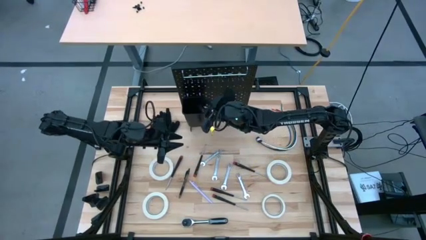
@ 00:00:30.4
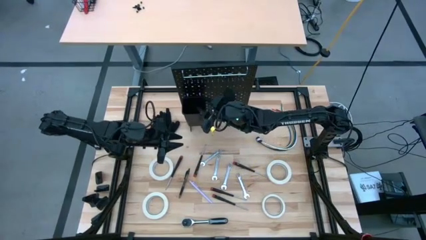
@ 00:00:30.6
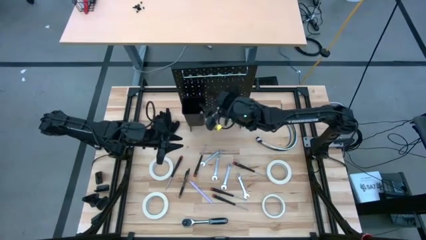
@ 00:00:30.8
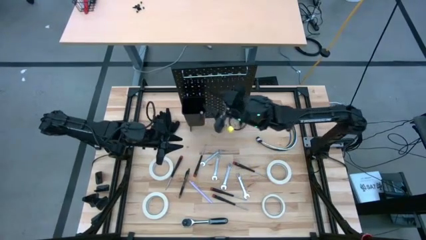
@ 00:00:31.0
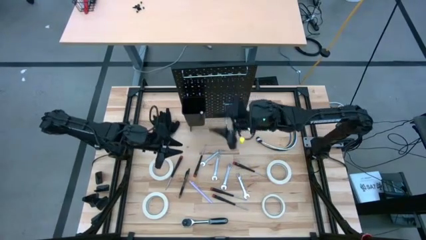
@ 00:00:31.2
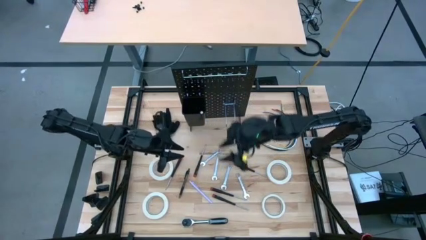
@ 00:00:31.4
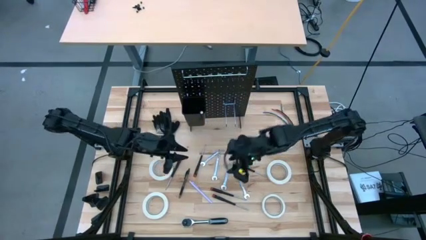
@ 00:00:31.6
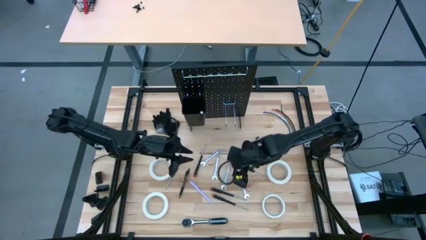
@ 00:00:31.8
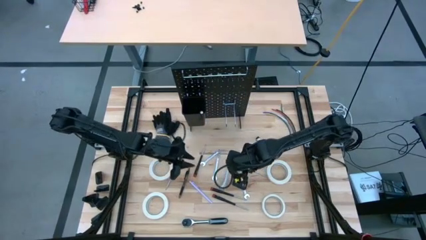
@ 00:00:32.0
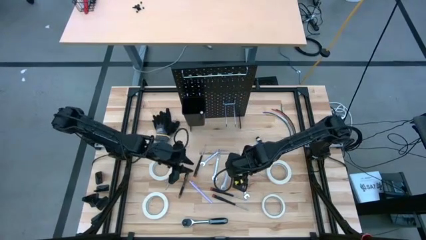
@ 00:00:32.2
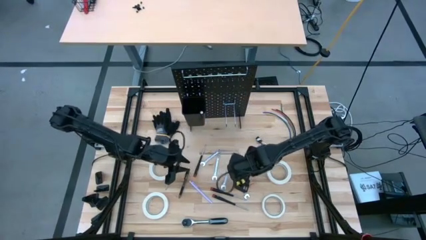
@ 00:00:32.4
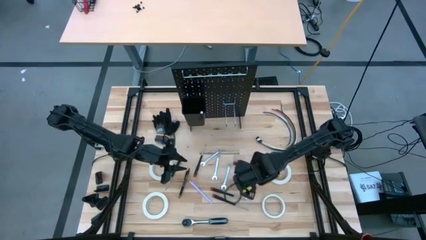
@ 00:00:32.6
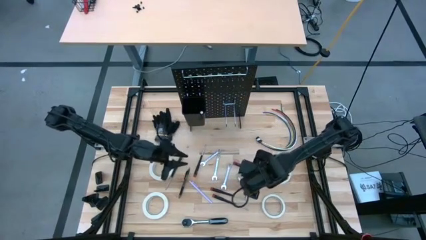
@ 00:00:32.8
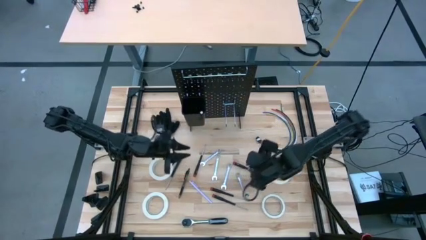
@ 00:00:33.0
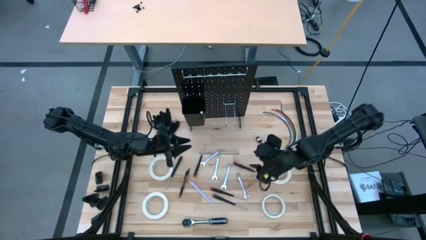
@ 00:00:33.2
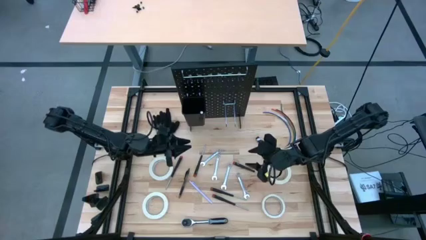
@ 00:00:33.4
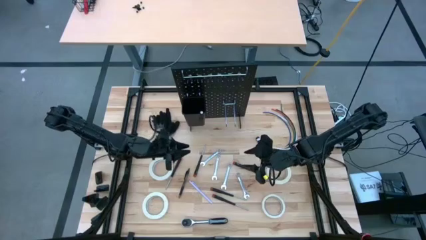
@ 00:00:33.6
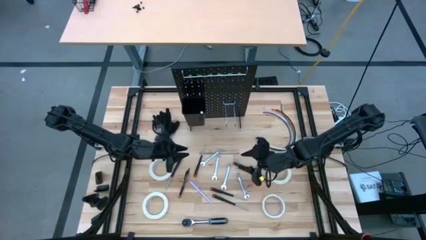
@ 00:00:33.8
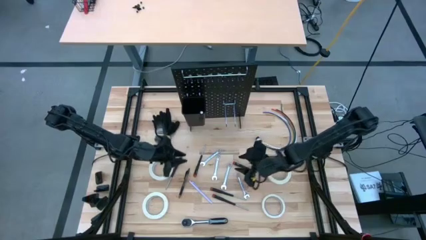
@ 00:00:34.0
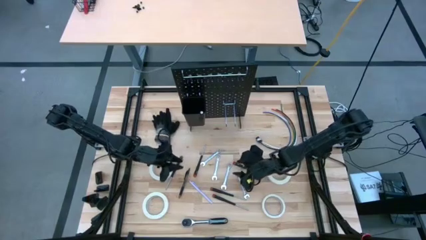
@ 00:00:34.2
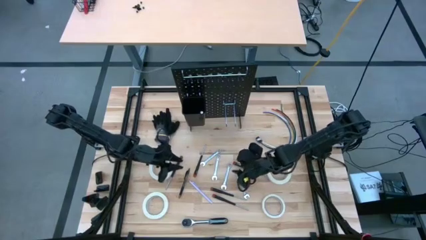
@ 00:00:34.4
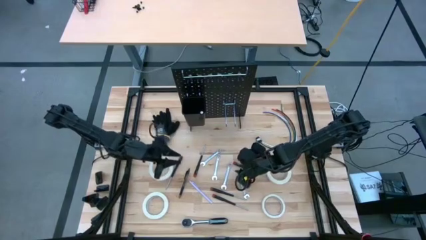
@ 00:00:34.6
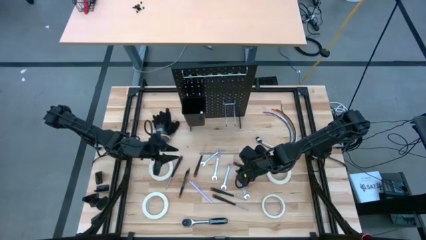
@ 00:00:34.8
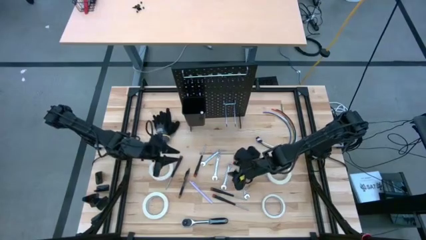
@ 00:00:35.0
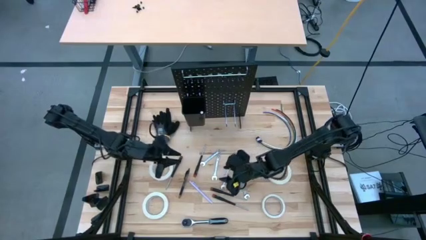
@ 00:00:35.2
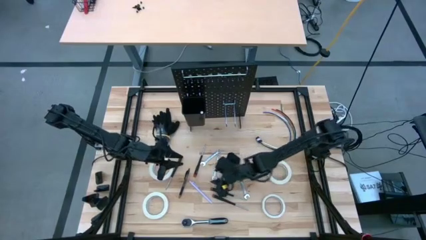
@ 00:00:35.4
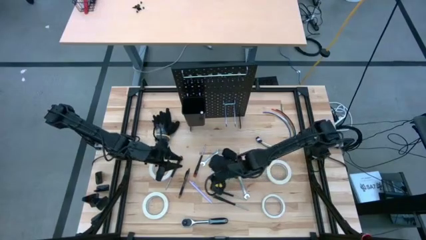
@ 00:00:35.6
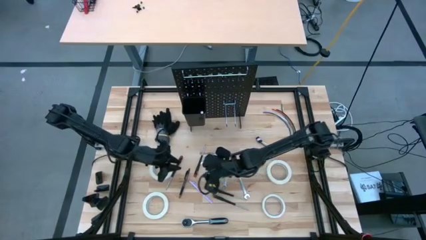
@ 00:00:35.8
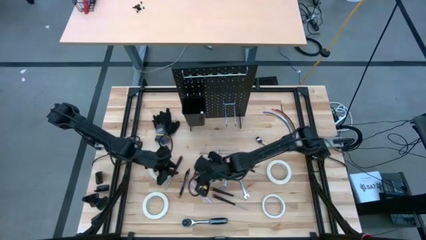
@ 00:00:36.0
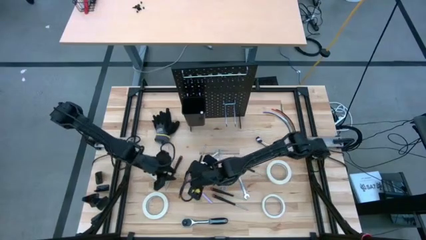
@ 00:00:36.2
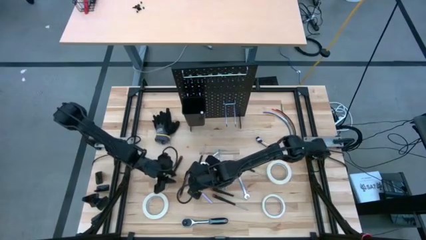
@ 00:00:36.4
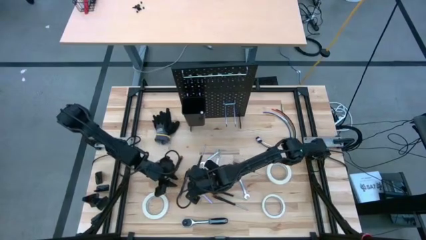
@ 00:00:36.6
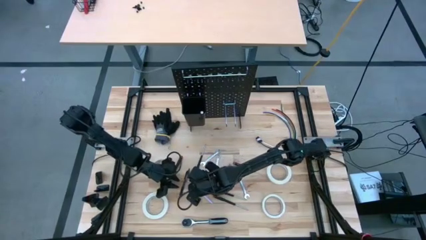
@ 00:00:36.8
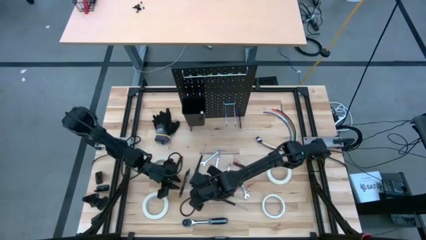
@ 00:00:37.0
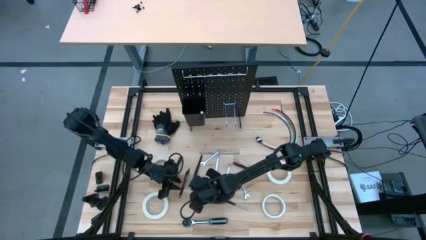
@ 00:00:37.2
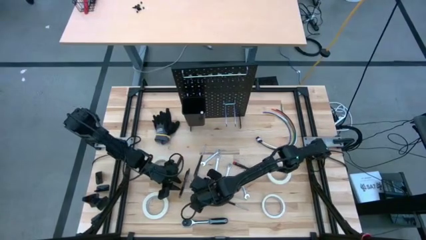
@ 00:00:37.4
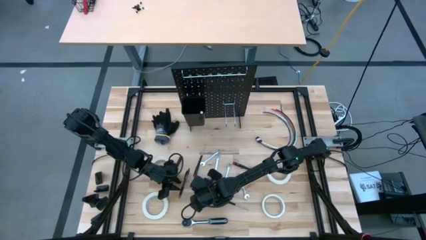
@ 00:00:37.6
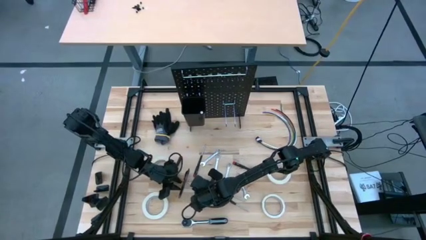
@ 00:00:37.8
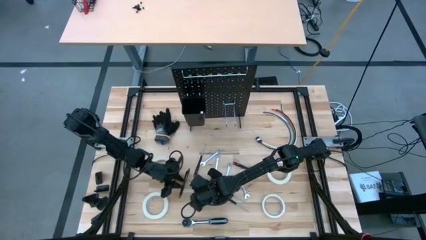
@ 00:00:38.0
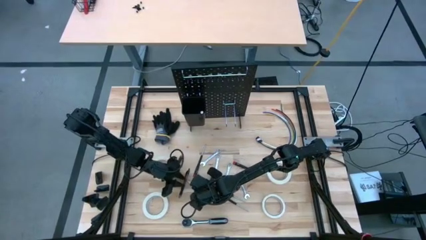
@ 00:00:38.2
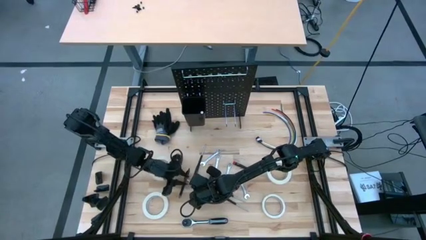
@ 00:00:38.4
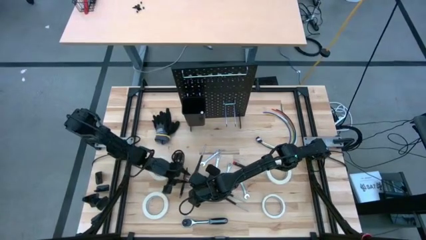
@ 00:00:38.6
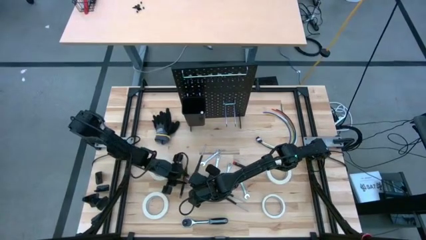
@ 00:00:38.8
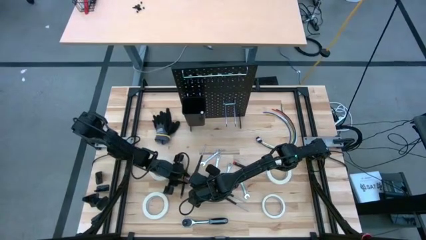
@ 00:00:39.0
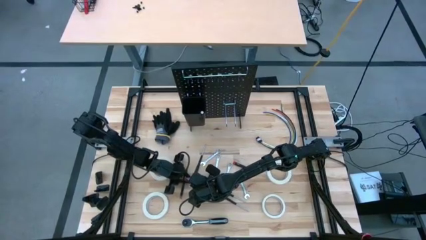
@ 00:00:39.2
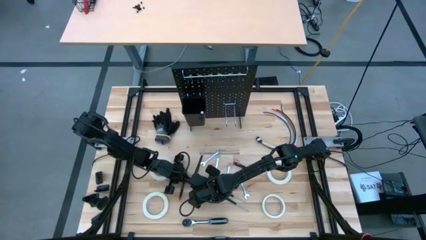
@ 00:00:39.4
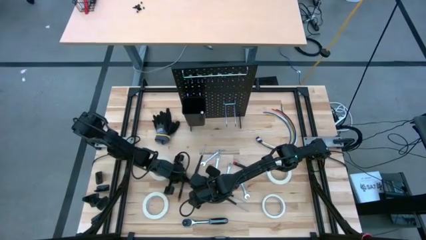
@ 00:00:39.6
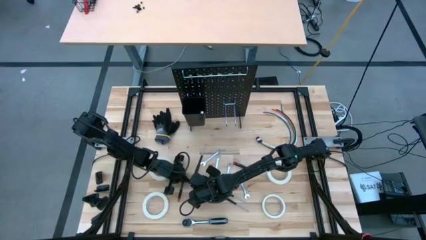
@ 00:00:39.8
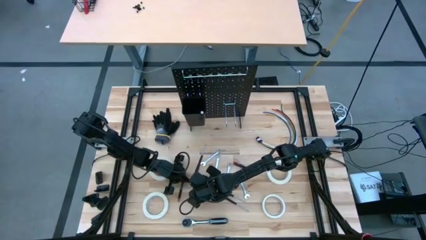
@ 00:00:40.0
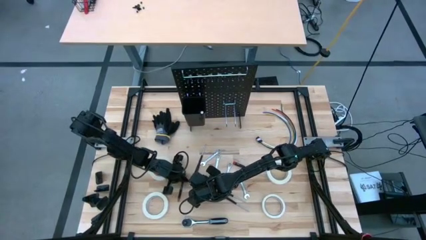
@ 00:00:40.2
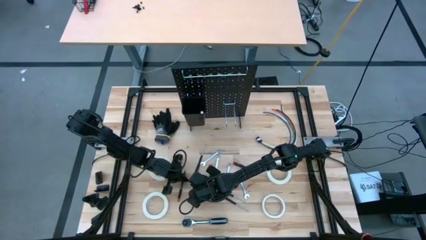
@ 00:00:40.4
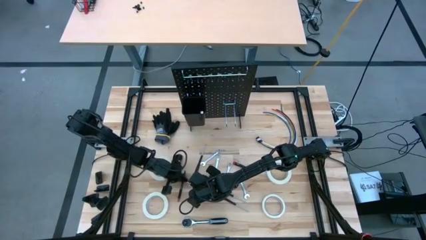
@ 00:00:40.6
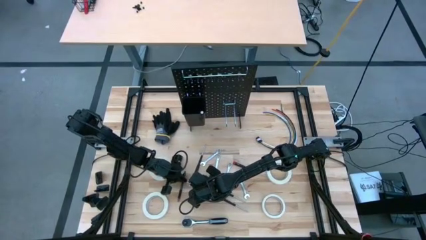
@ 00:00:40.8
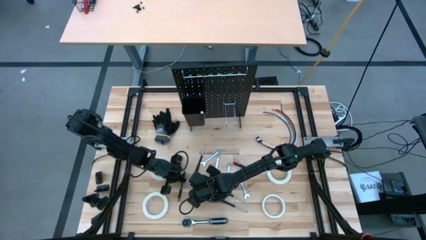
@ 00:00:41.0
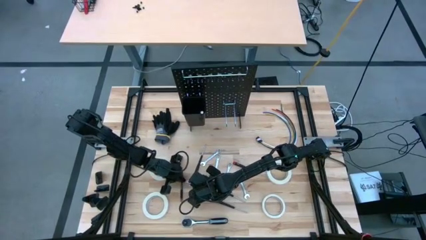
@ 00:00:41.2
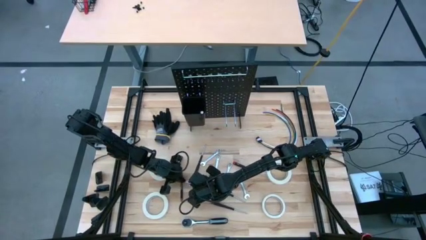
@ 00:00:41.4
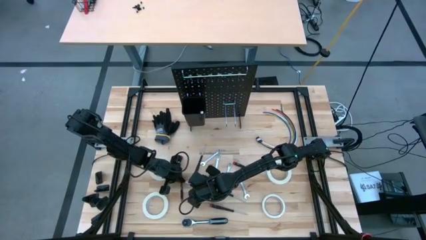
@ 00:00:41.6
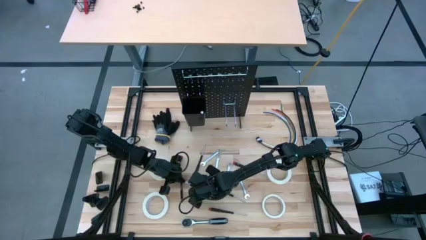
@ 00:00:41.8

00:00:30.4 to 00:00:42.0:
Task: Hang tools onto peg board
Put the purple pen into the black bin on the peg board
